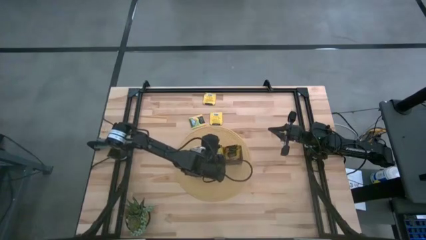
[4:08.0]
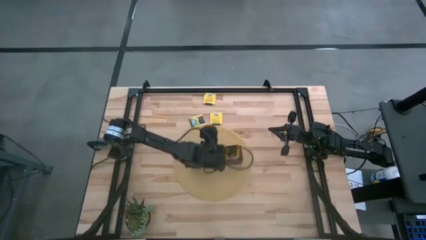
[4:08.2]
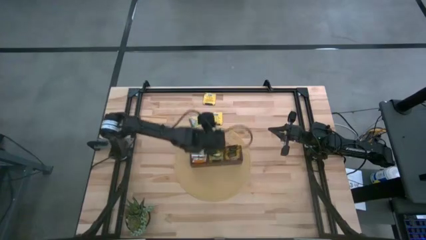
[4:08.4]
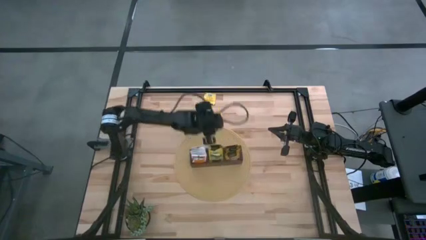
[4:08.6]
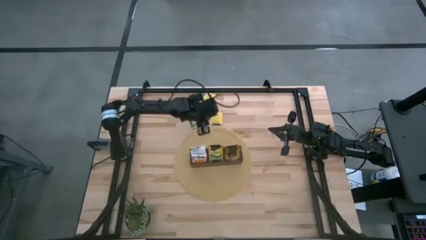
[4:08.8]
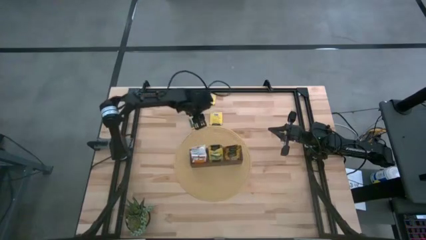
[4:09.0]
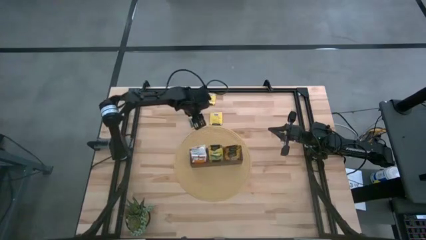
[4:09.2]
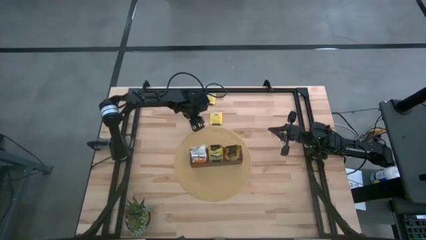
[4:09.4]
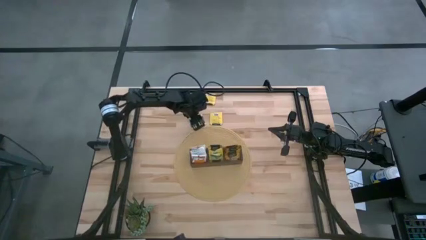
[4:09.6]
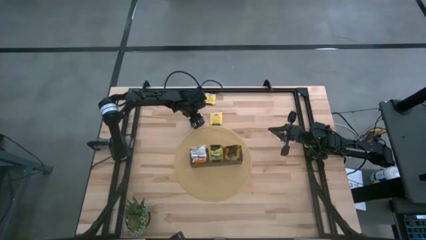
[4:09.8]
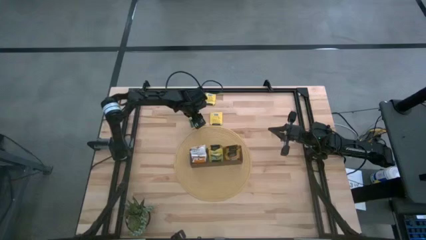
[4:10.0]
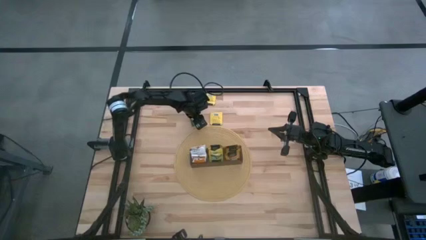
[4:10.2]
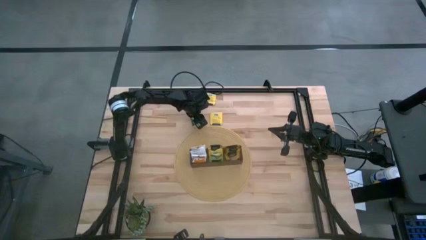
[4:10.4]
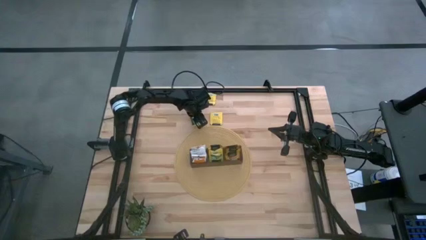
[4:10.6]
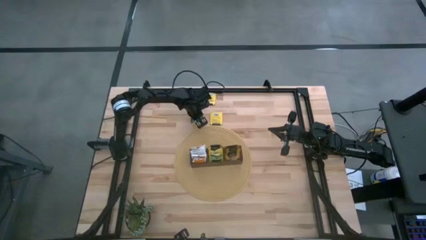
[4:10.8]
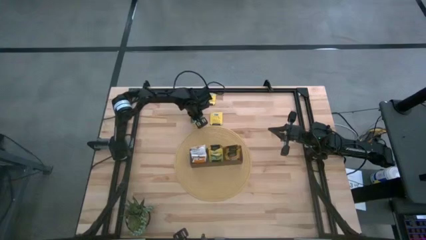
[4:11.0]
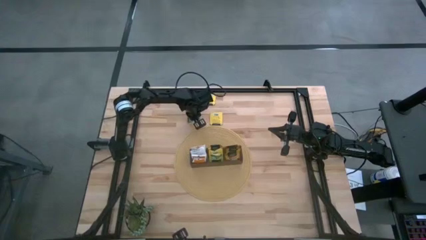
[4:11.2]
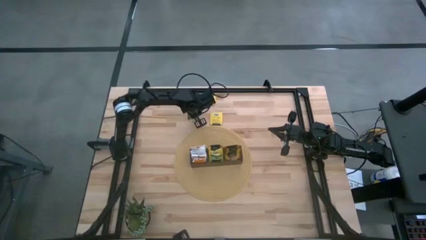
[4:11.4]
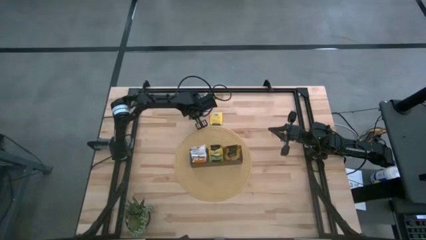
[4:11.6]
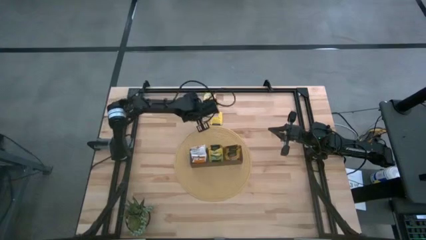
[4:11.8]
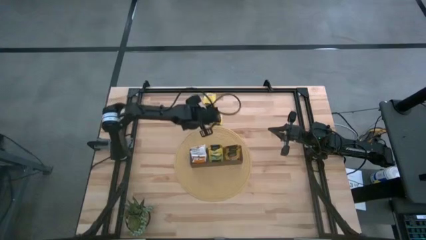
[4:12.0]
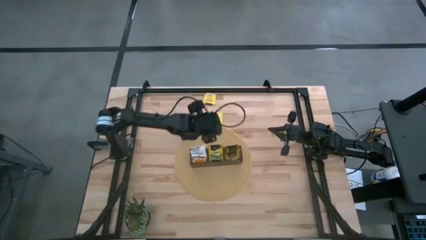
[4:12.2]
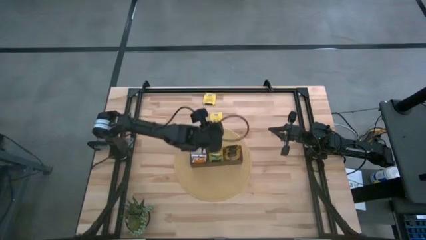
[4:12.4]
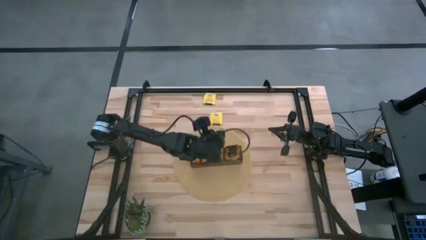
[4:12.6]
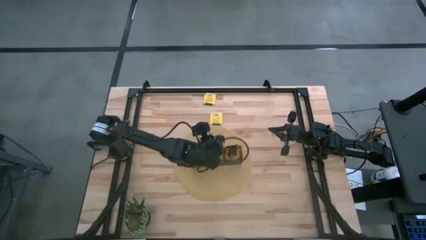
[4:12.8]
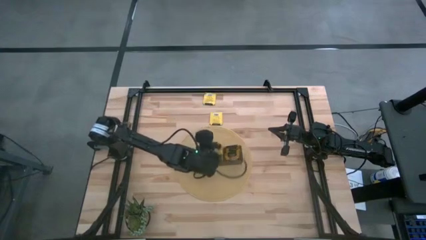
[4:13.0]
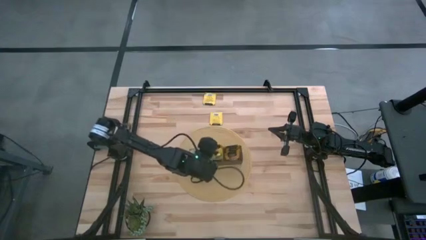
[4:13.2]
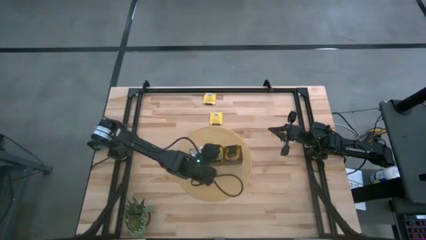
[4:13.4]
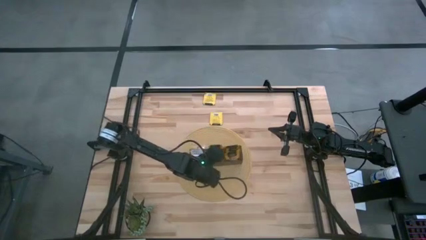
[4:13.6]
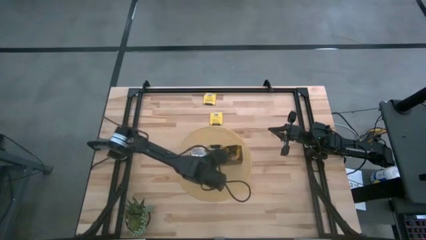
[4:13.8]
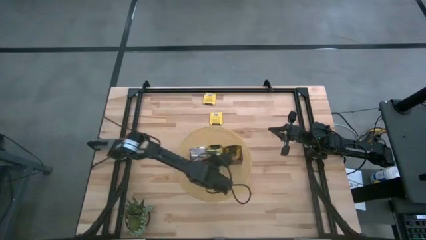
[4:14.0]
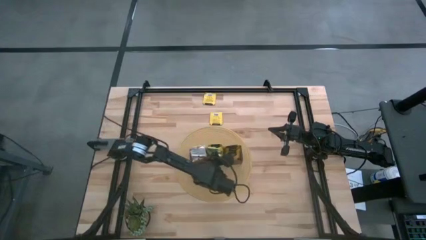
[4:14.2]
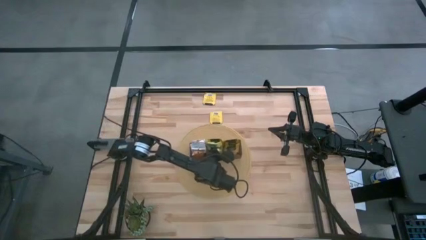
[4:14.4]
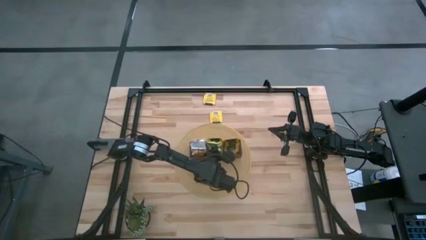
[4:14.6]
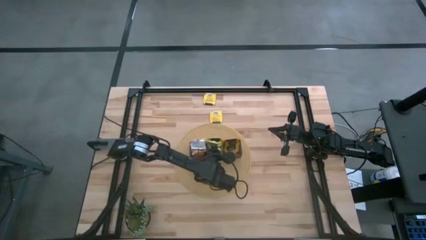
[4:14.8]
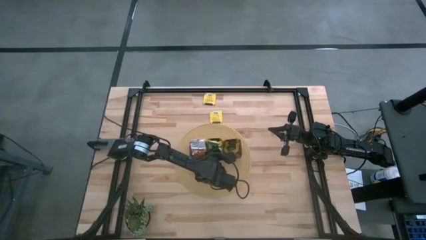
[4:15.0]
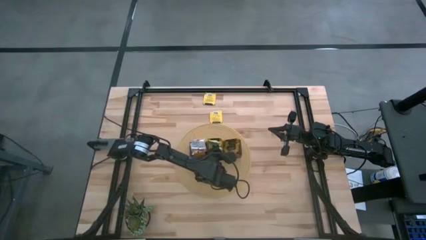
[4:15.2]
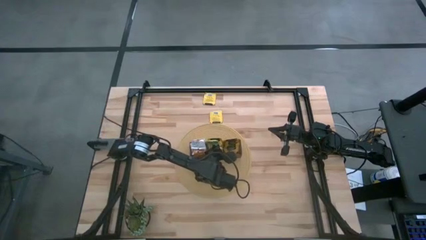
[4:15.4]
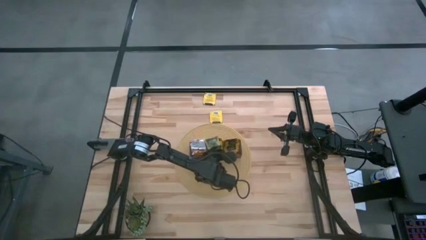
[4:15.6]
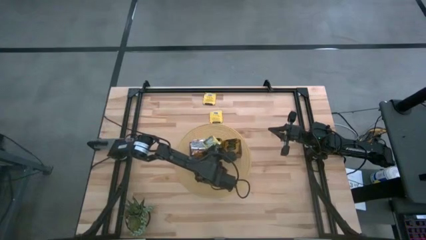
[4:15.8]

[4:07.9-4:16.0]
Task: Pick & Place Tea
Put the yellow tea bag into the wooden organizer

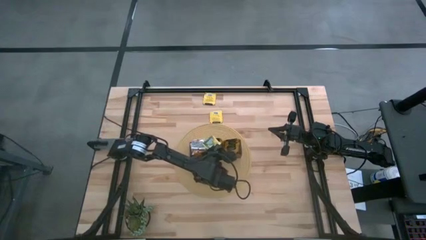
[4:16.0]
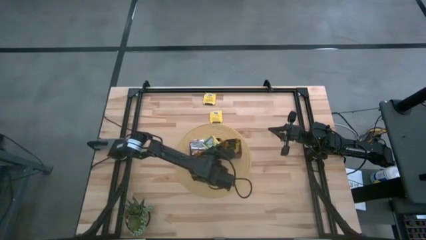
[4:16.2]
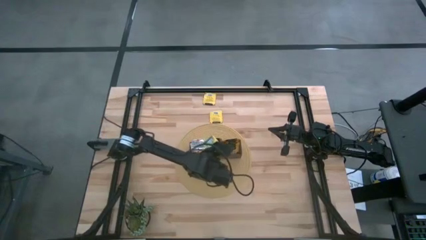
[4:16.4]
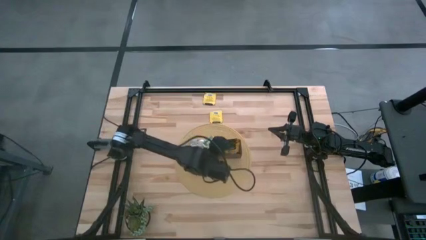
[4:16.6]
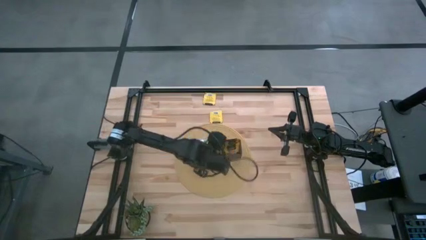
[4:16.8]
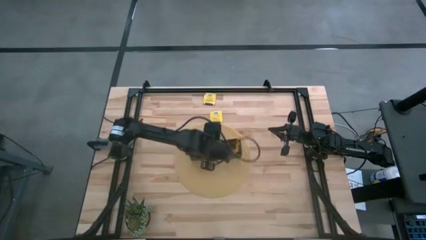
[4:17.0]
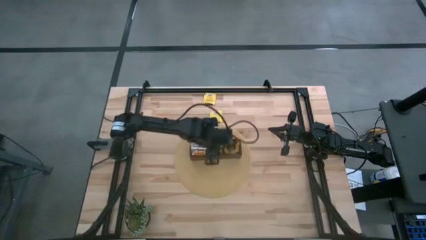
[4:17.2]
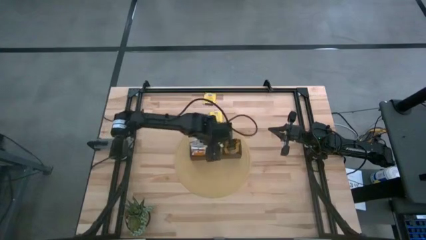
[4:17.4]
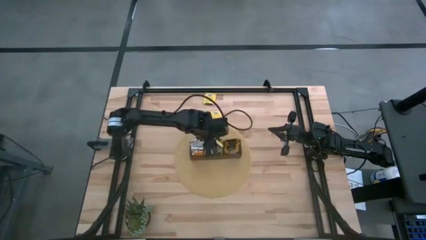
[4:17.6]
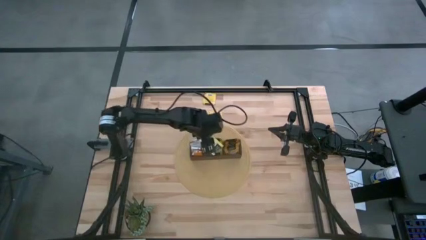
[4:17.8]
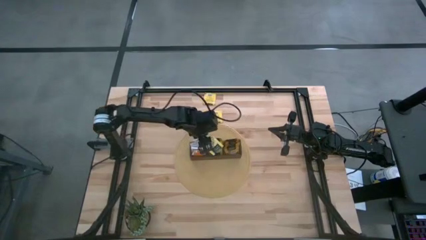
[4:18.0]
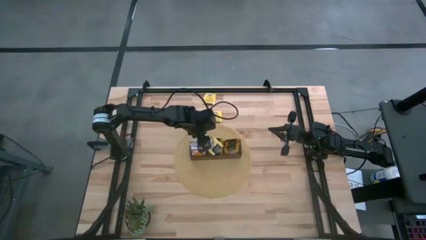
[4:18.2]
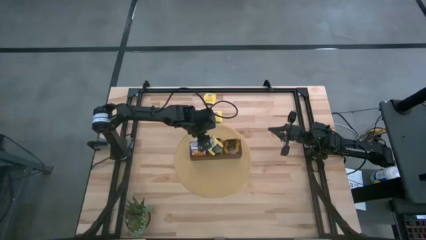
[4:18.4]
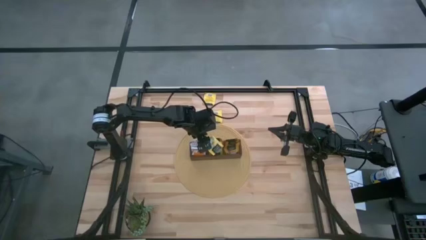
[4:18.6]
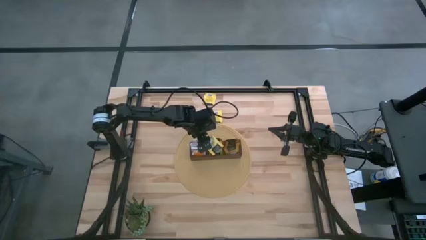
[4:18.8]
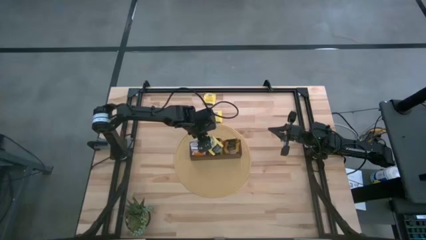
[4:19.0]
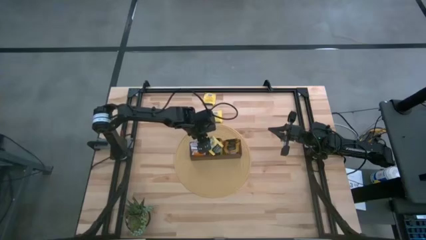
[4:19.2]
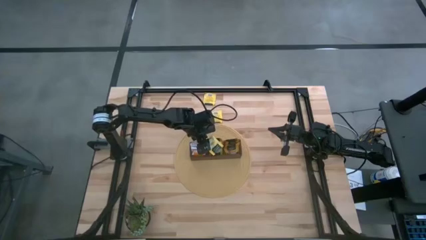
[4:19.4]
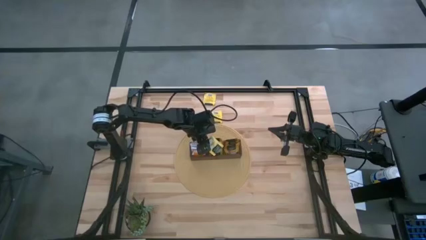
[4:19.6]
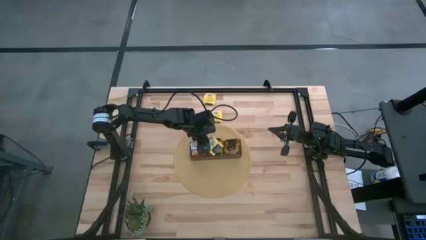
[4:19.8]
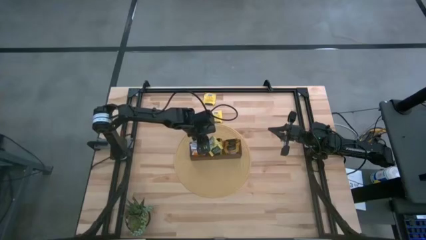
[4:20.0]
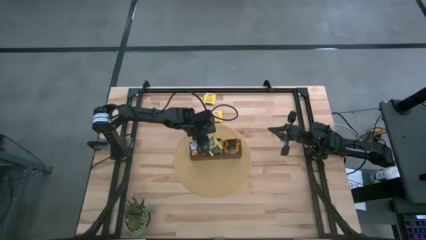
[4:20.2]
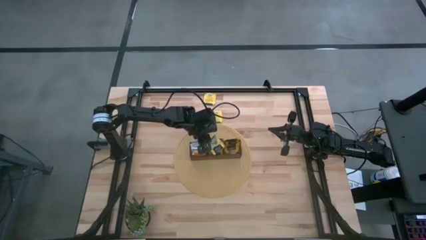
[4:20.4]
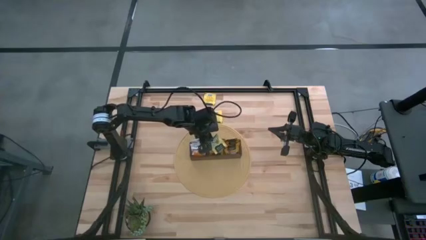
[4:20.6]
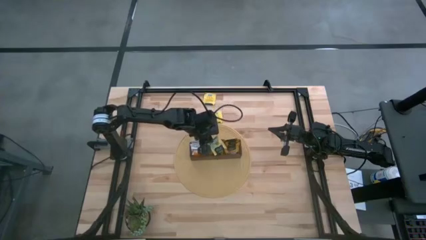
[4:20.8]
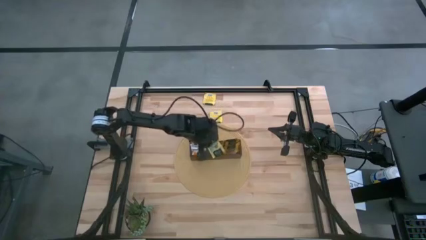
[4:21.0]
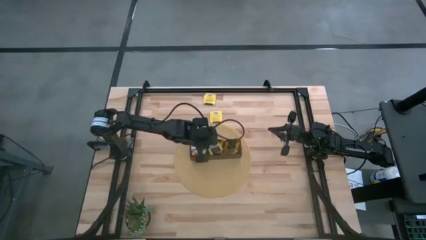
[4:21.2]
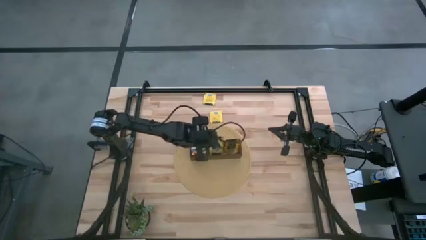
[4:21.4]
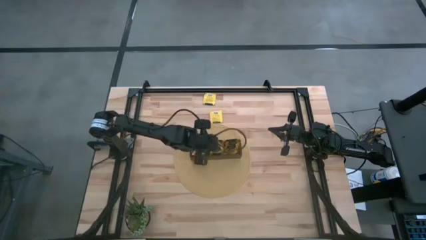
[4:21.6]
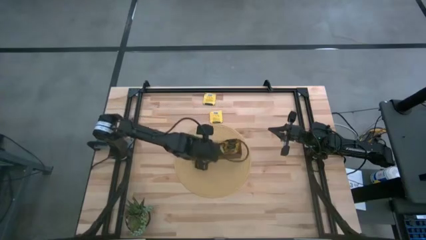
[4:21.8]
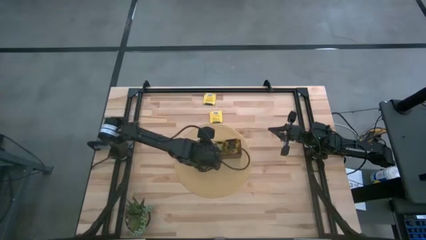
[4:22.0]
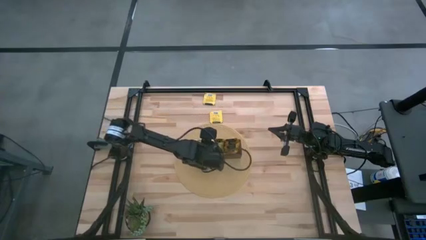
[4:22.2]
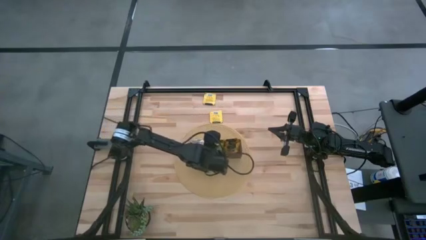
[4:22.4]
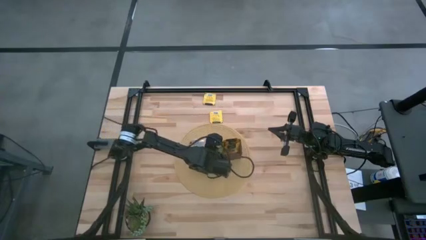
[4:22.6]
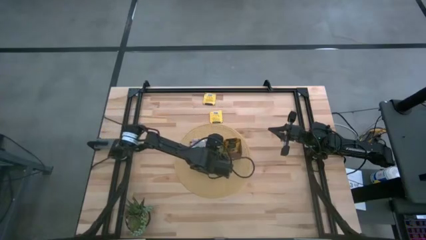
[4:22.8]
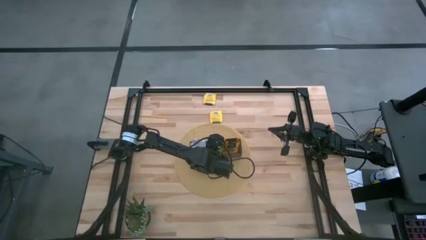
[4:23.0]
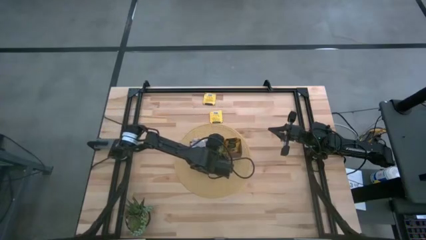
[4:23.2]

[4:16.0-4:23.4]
Put the yellow tea bag into the wooden organizer

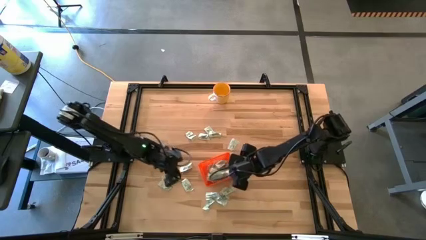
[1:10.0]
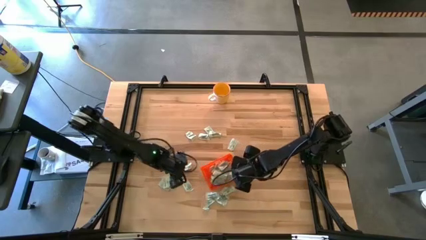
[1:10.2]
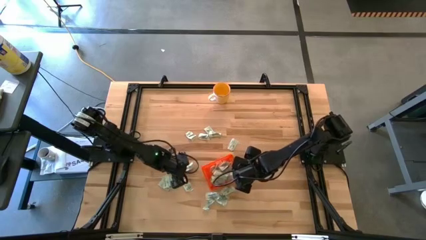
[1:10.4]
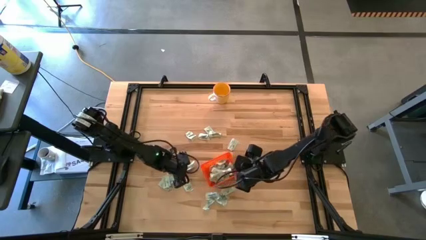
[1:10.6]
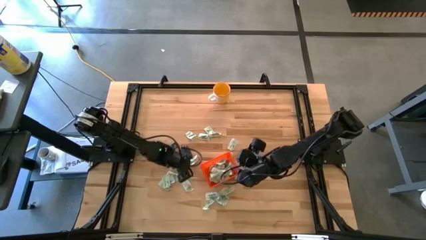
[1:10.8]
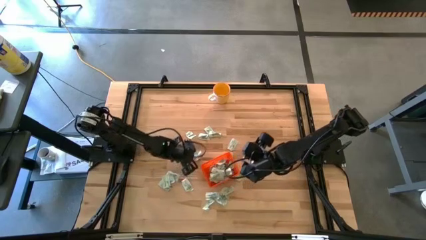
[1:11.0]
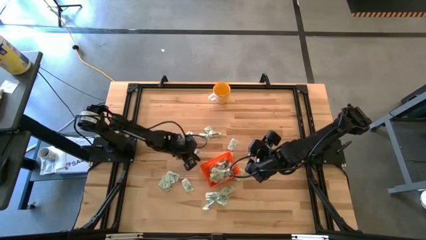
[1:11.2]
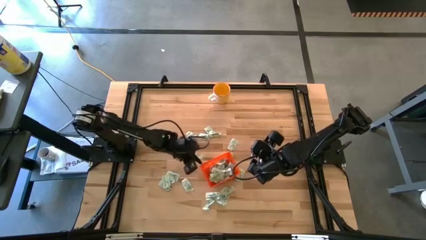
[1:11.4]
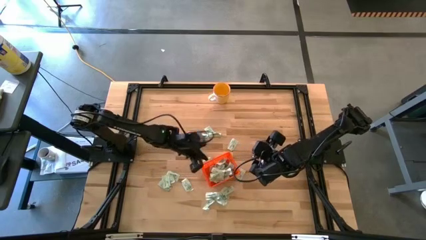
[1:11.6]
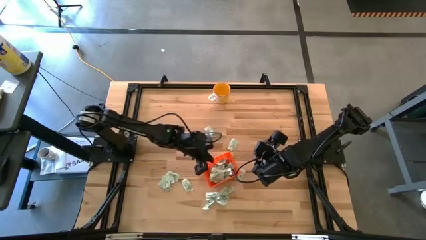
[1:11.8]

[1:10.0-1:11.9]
Task: Pick and place Stevia / Truvia into bins
Put the stevia packet into the bin

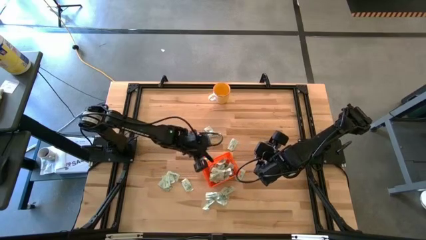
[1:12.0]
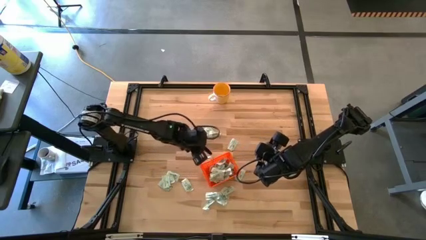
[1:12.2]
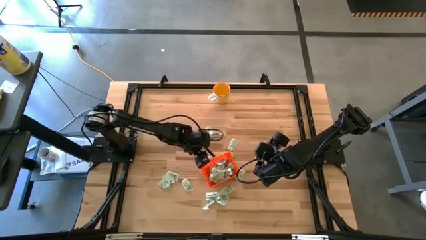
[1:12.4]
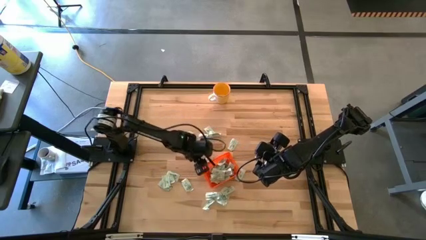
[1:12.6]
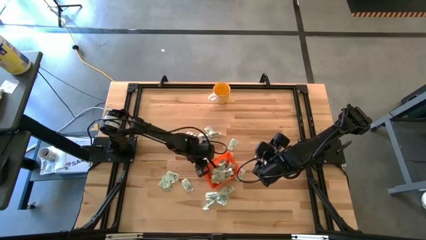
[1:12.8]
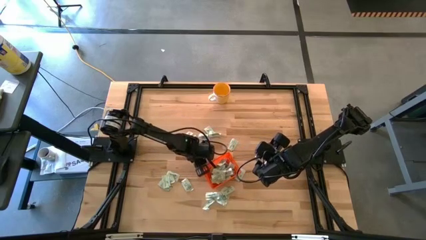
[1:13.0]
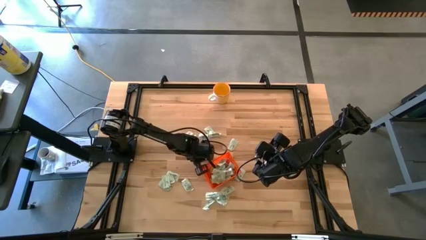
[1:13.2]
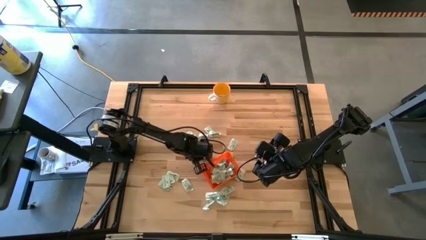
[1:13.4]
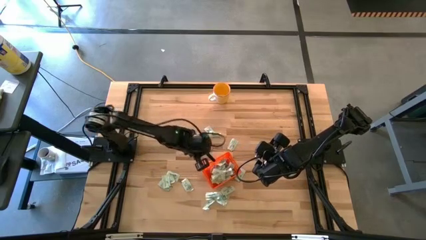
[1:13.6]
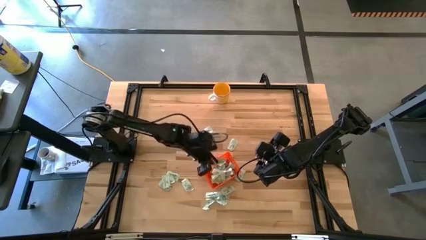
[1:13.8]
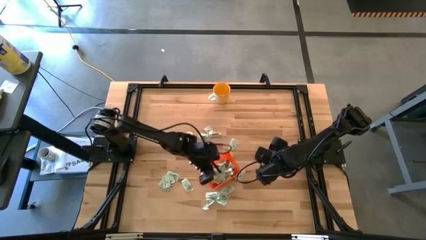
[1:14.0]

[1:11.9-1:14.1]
Put the stevia packet into the bin
